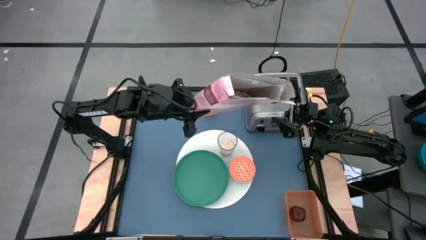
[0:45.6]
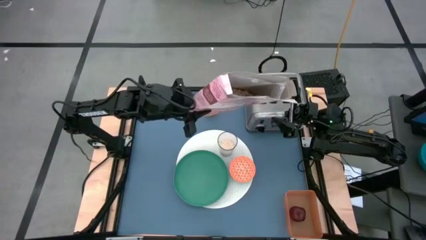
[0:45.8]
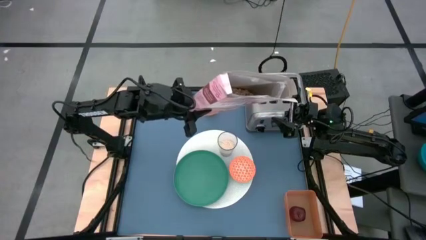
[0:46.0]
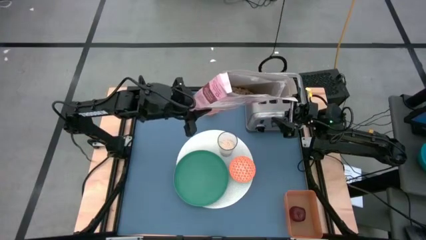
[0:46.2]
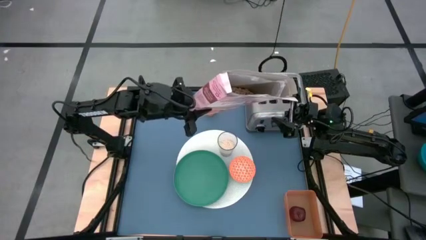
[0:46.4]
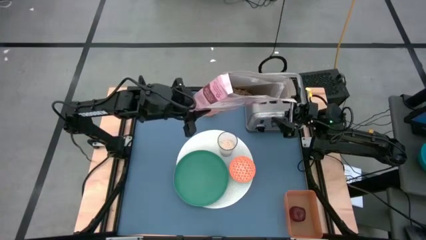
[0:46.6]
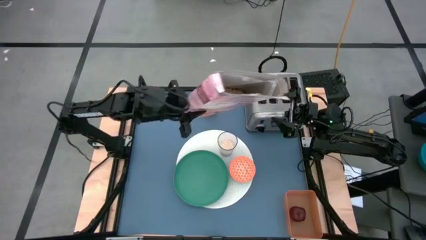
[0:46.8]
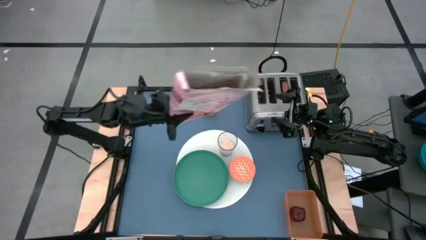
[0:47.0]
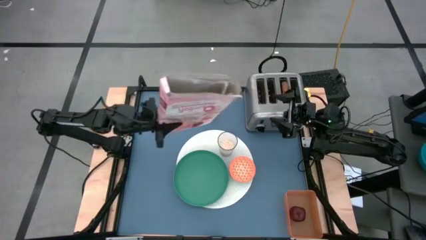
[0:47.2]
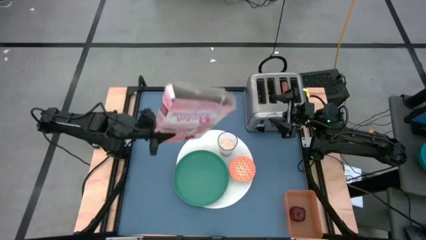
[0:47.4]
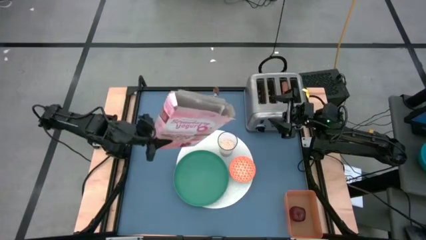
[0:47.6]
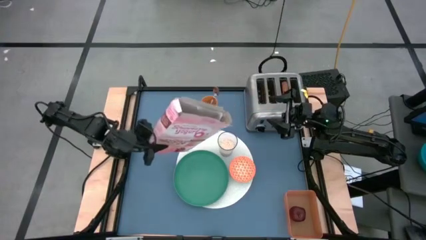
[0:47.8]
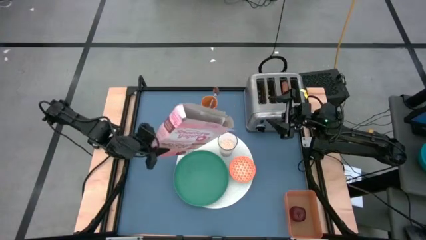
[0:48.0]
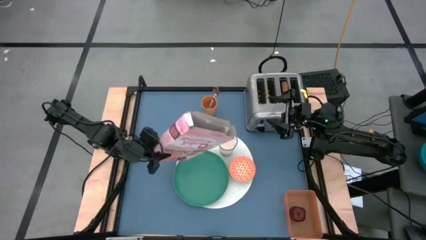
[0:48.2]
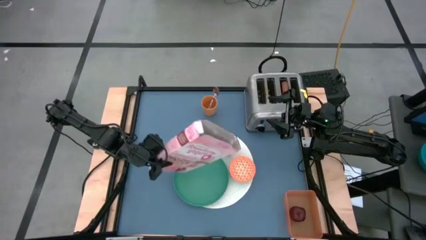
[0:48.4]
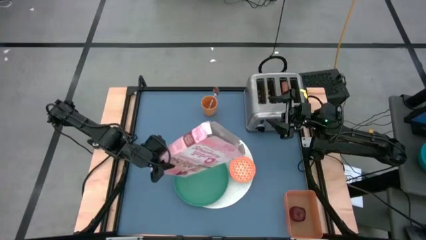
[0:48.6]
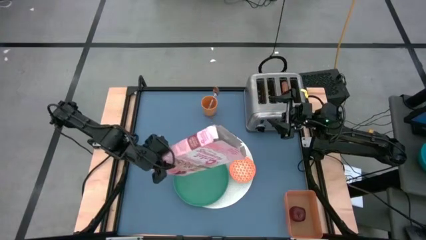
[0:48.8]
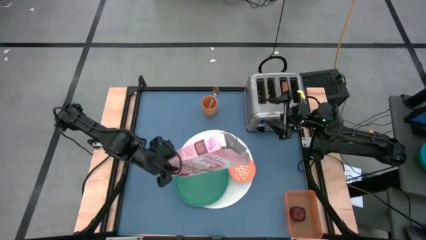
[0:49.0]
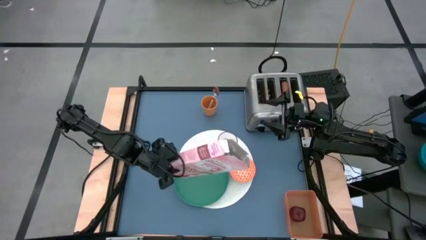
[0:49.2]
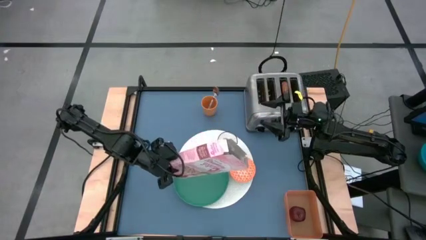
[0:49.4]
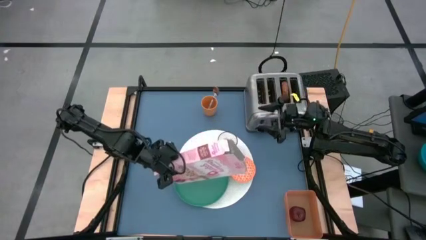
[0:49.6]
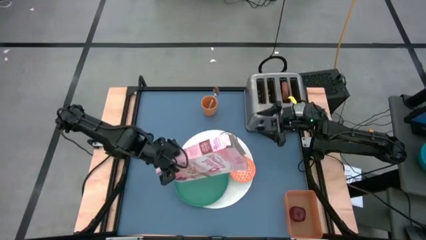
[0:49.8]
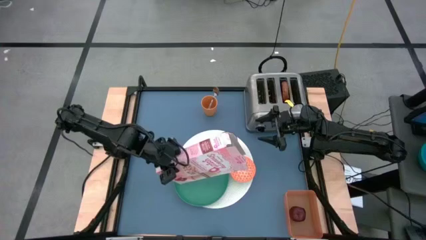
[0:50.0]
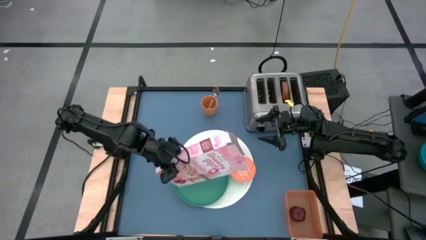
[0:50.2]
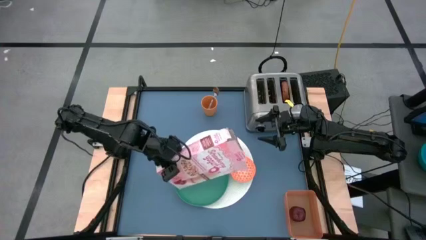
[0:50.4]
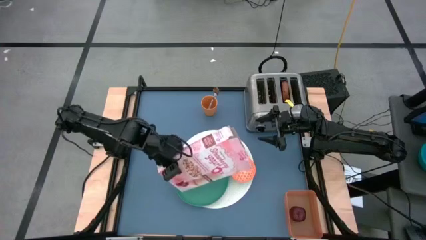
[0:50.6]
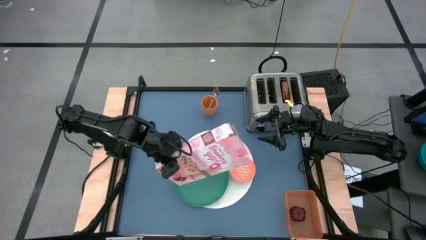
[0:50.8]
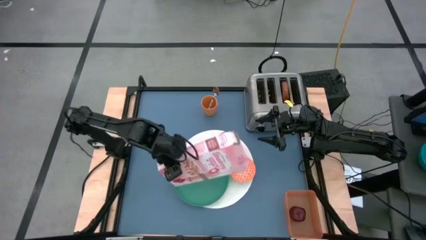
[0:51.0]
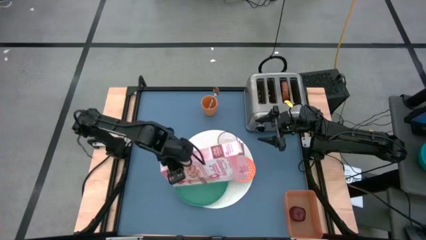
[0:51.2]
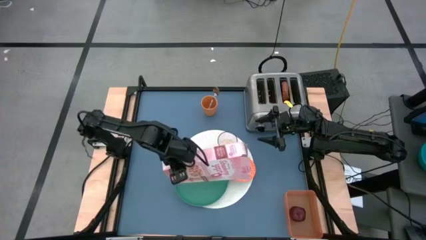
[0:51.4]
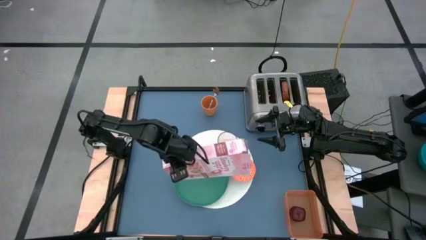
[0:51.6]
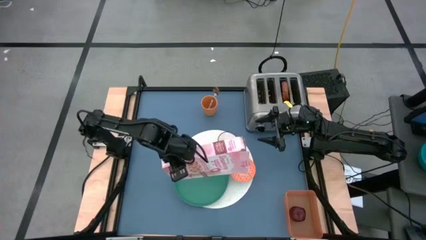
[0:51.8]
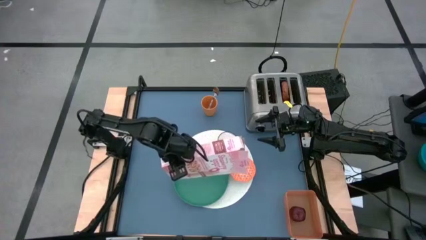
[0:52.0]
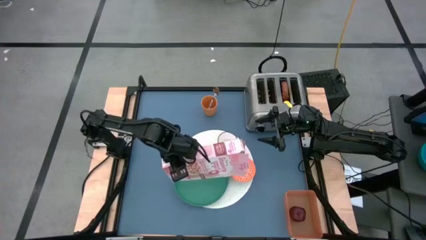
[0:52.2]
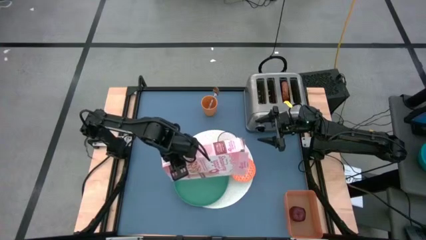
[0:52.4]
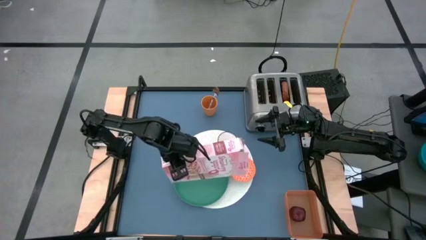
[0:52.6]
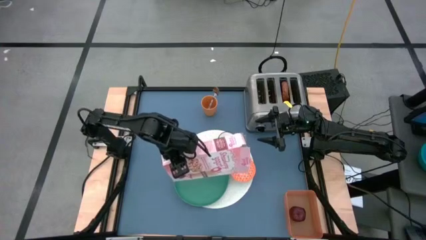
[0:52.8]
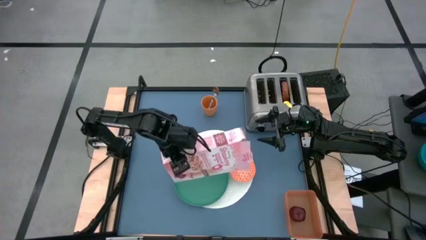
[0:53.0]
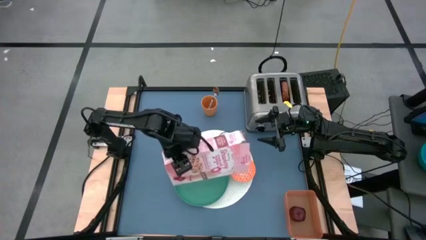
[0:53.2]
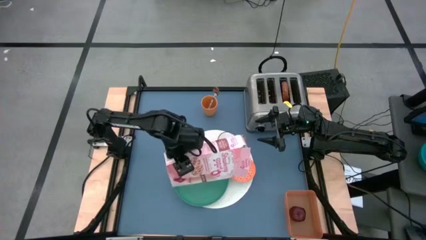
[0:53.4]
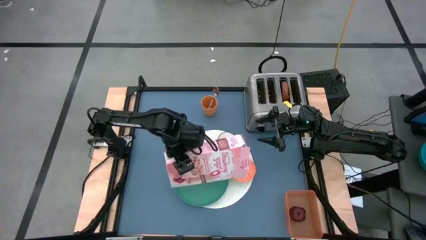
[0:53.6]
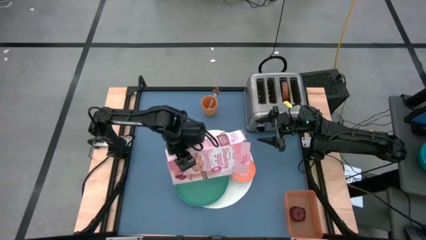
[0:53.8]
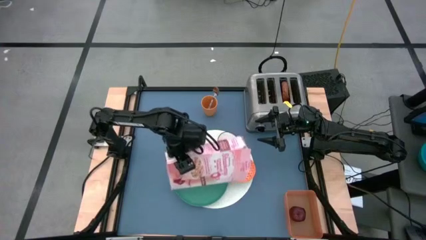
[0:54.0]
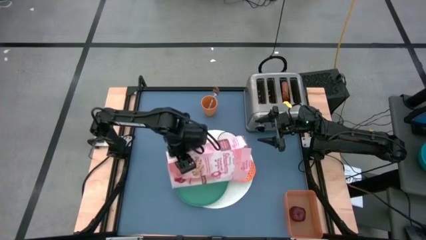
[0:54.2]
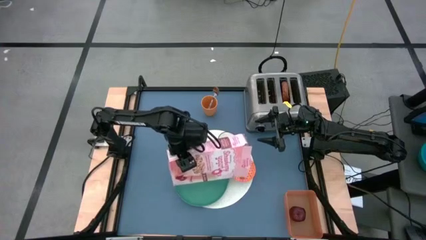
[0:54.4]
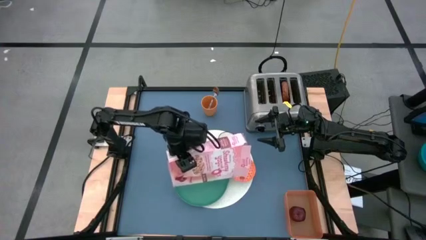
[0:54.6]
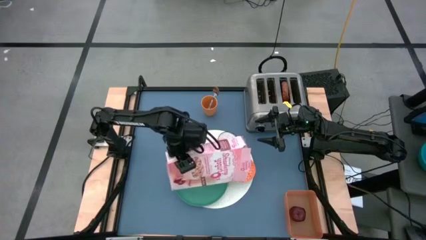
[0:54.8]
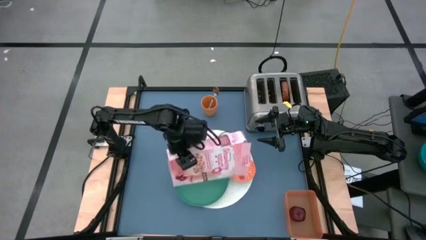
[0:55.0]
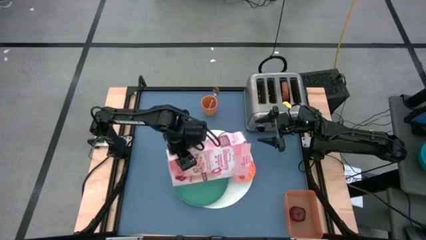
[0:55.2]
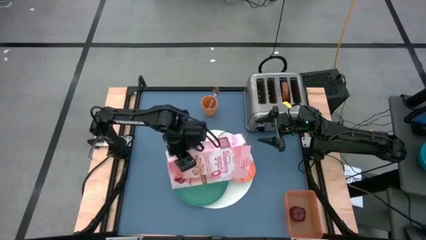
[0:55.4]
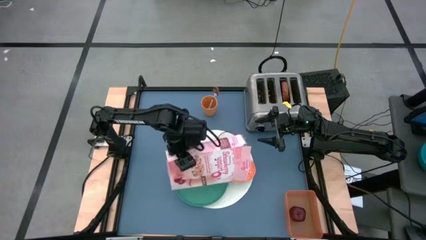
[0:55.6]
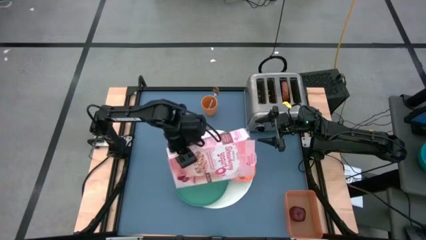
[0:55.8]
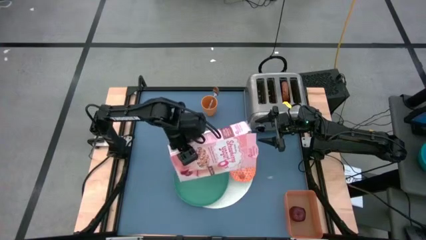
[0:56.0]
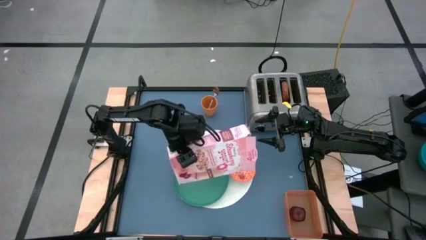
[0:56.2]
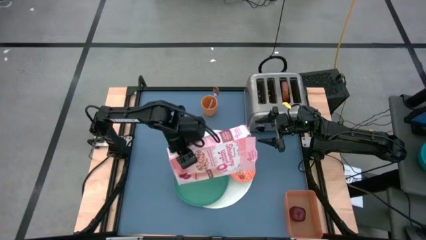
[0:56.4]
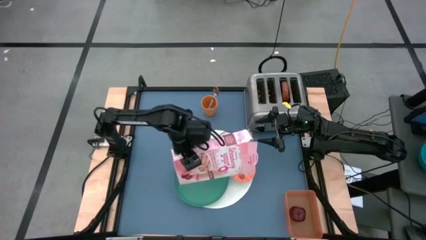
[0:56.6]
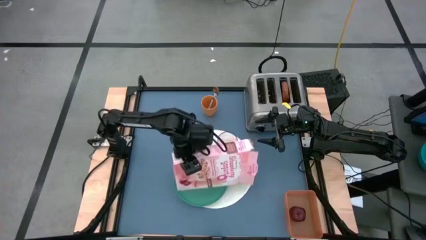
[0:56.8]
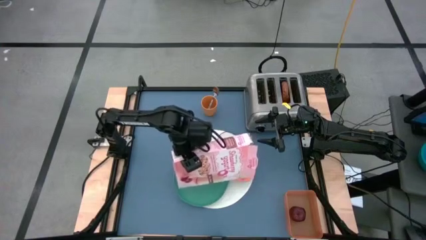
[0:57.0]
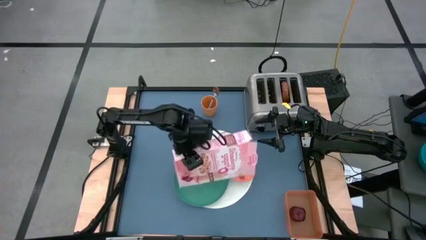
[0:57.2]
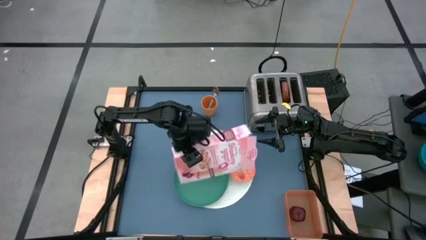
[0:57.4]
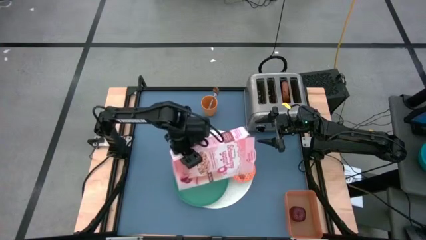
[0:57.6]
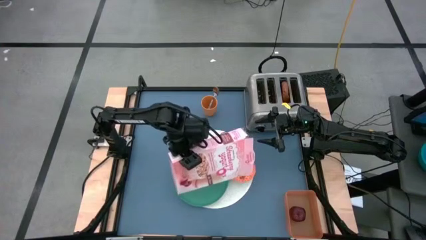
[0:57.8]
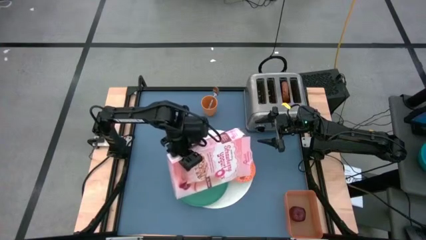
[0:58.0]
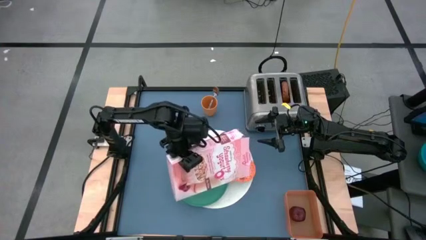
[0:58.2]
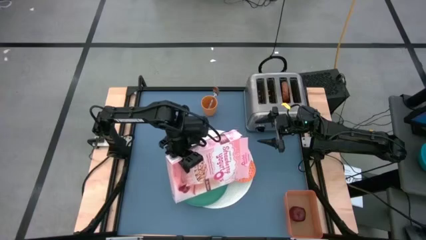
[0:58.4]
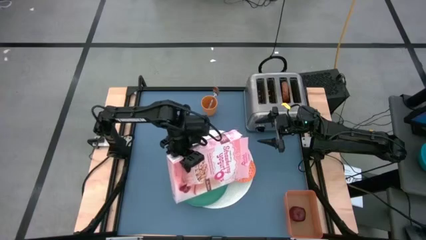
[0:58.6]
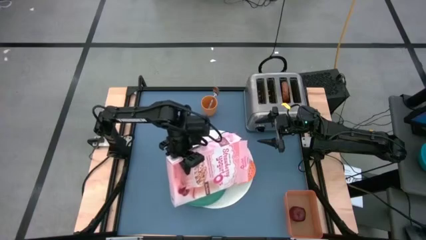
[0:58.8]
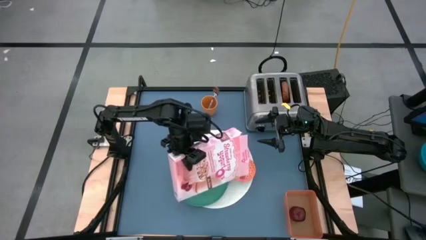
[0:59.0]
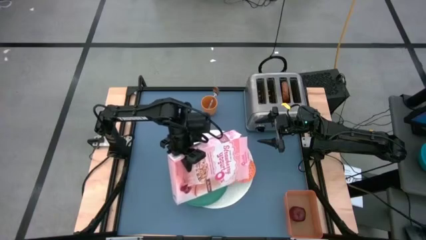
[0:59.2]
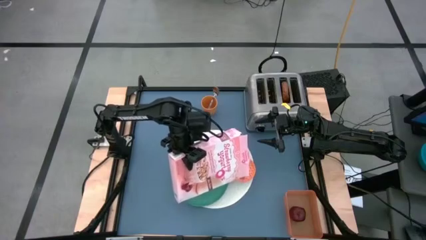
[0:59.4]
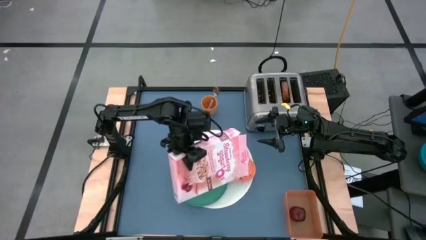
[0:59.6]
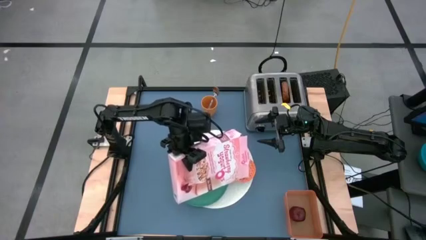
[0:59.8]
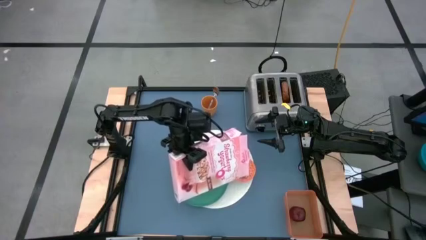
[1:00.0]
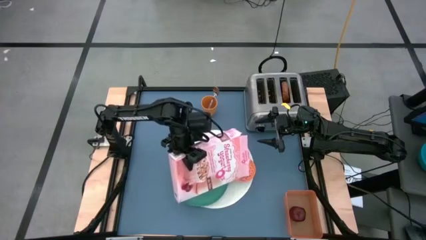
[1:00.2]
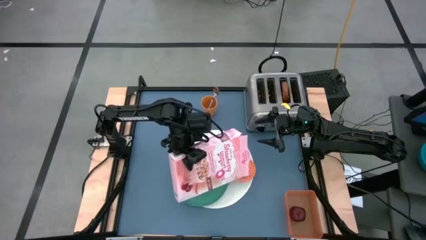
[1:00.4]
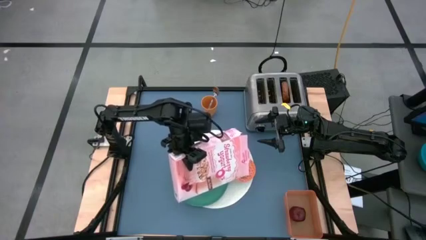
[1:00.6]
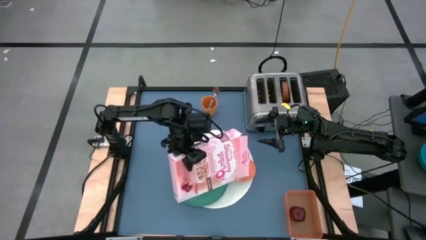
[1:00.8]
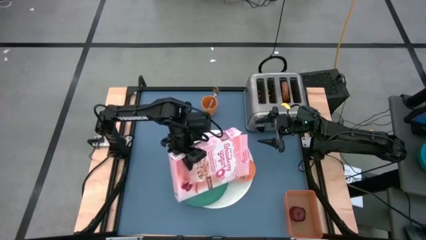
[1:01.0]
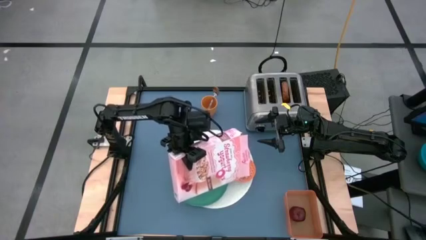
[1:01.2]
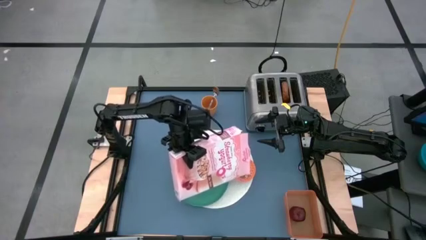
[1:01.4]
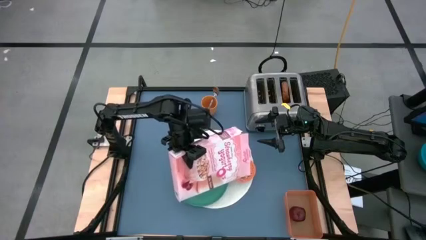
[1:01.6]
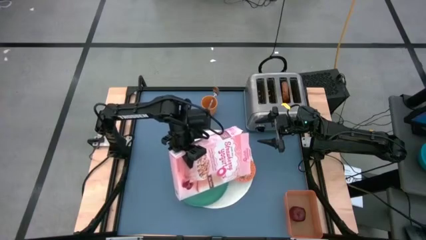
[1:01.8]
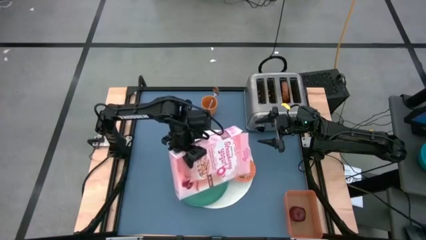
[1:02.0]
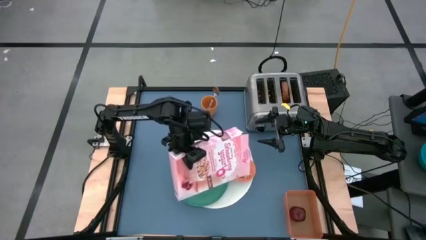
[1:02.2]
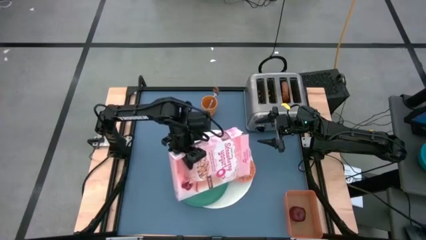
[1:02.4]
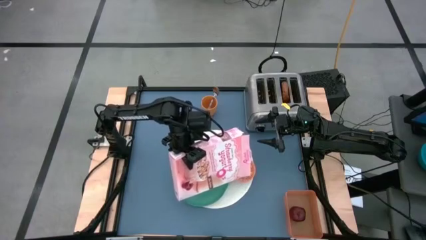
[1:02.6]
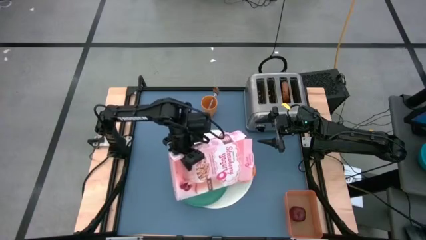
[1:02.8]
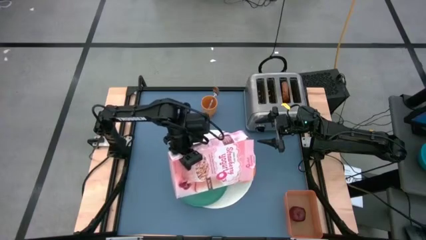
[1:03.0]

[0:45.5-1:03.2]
Task: Arrange a breakfast setting
Pour the cereal into the orange bowl
